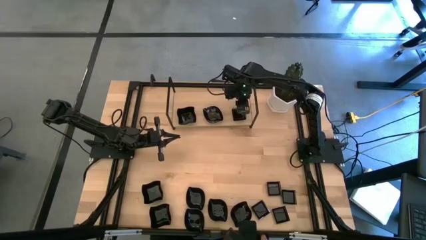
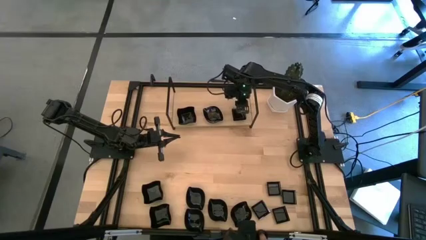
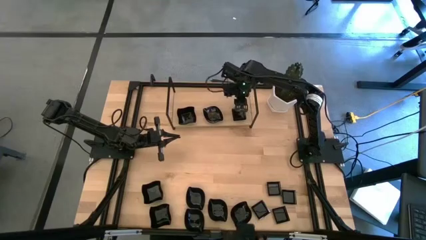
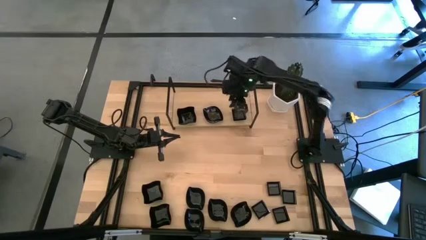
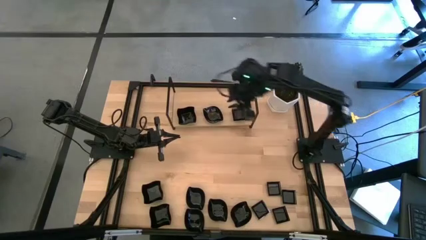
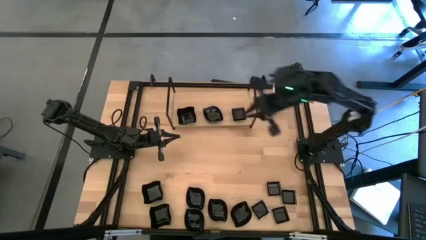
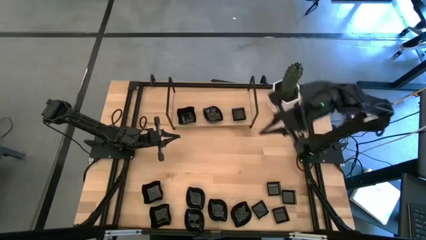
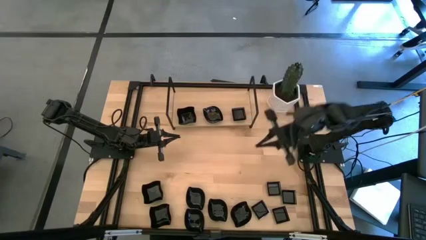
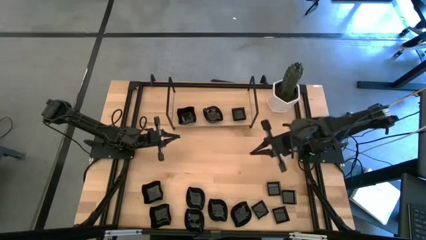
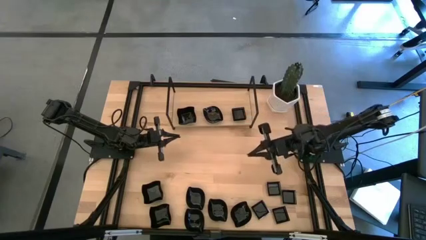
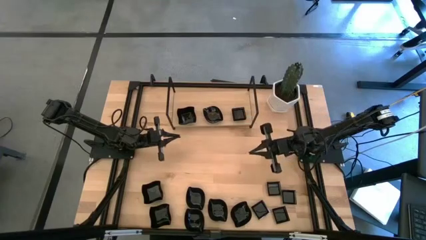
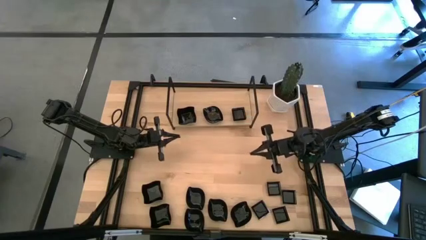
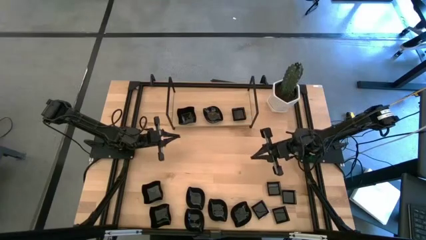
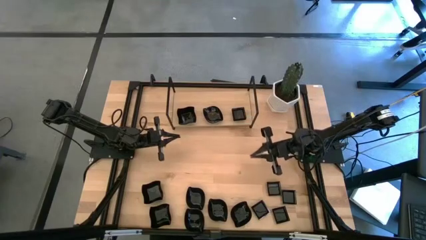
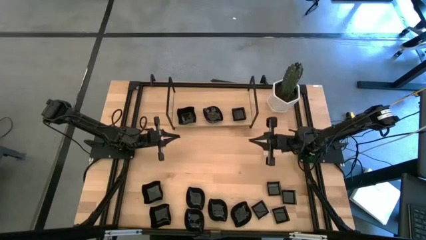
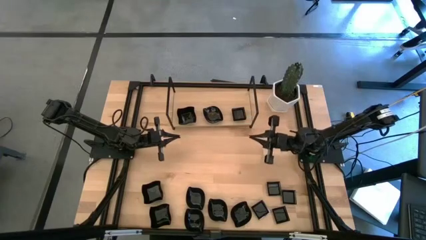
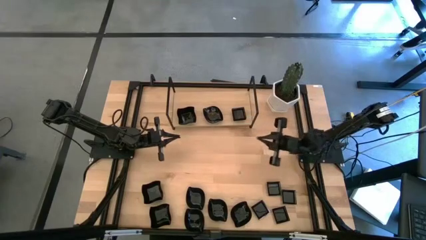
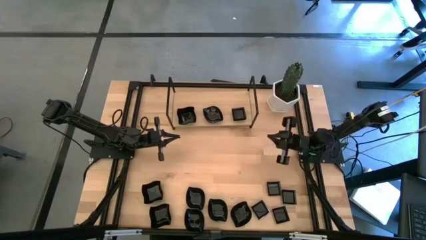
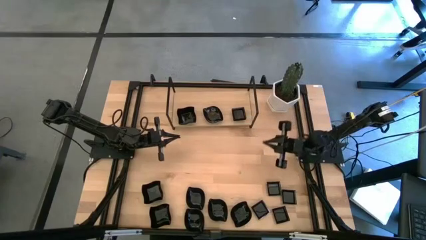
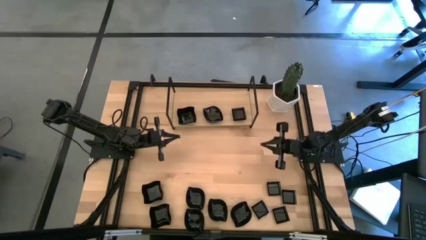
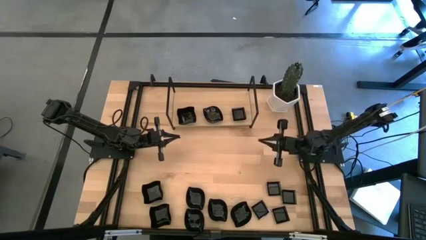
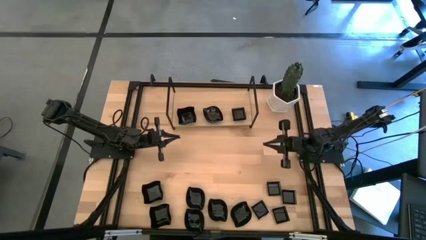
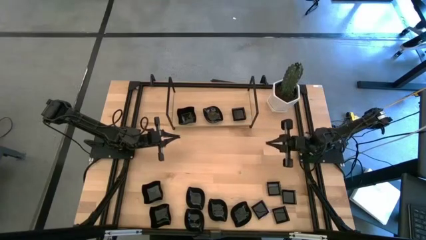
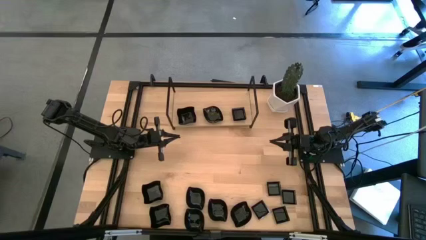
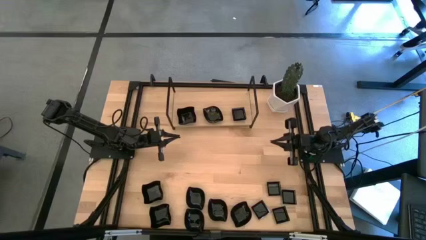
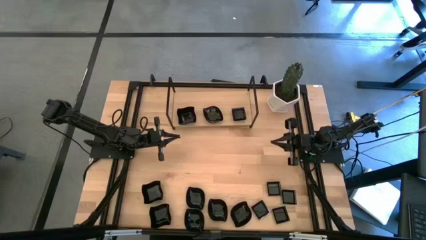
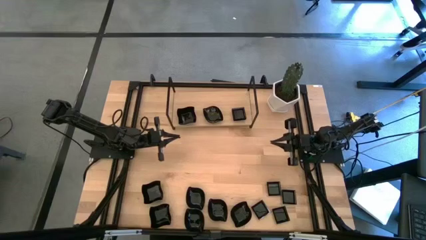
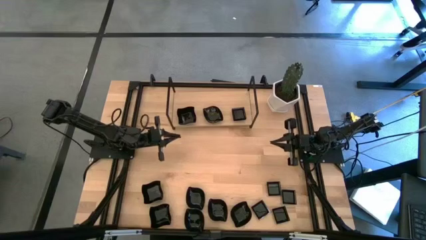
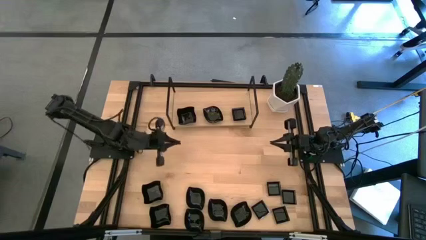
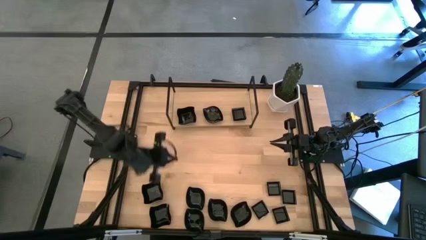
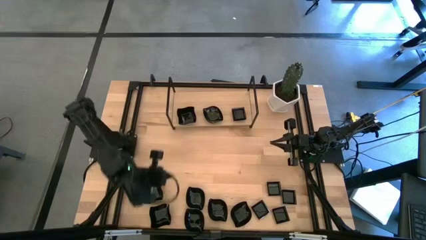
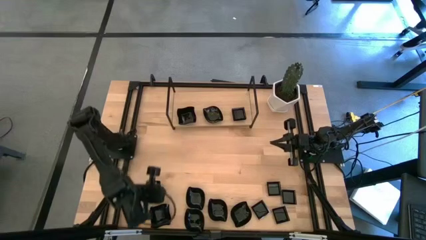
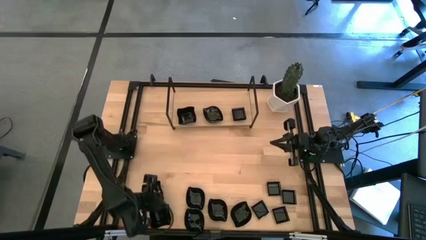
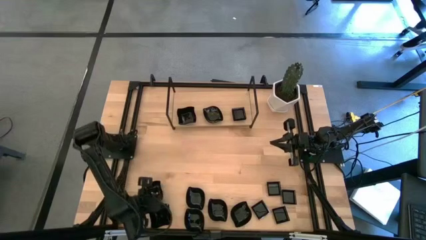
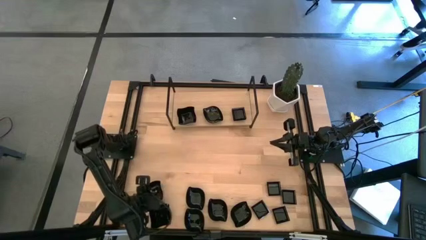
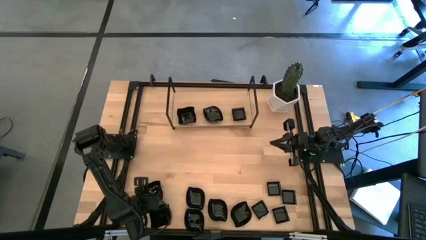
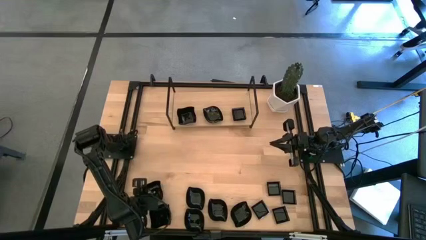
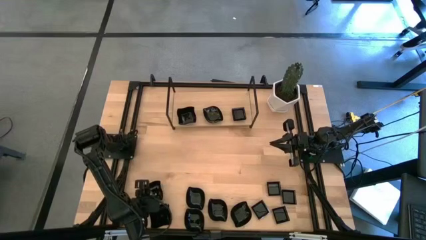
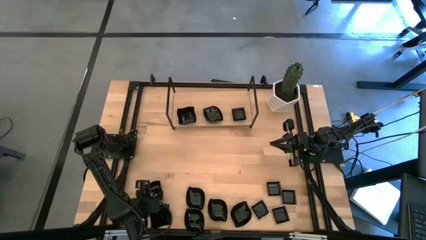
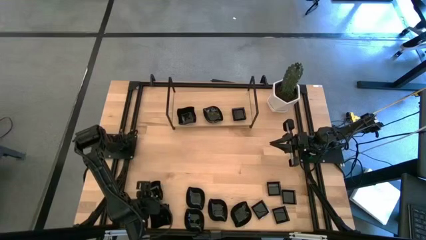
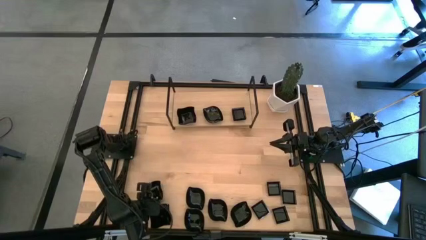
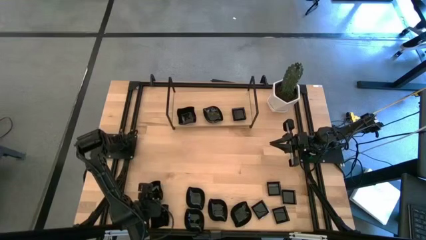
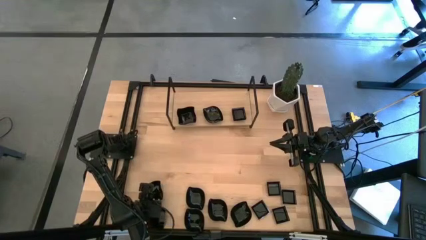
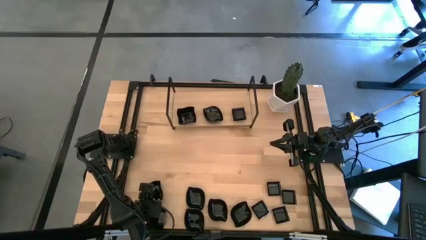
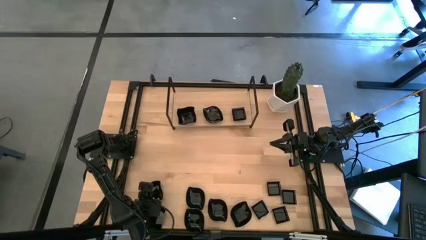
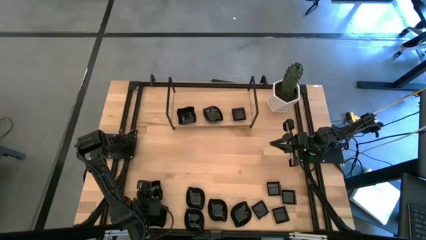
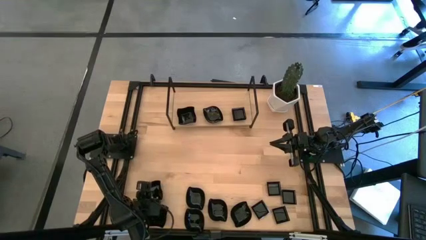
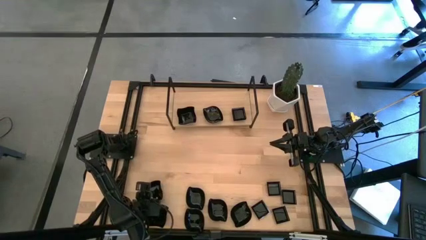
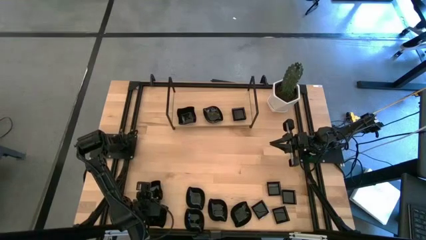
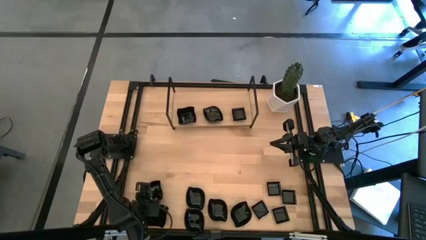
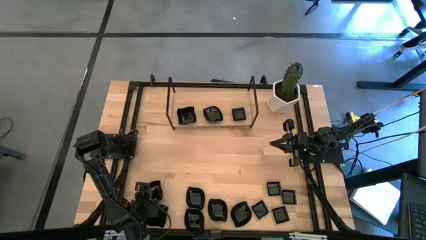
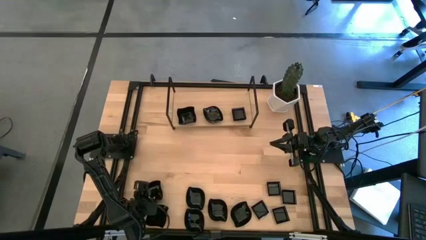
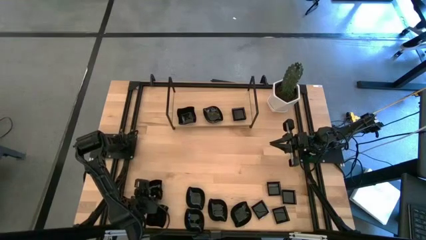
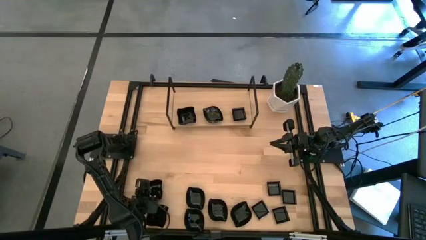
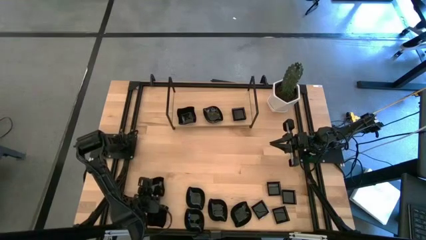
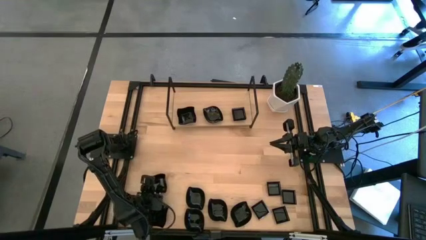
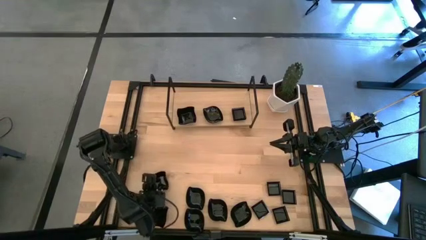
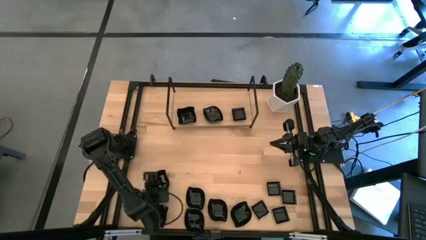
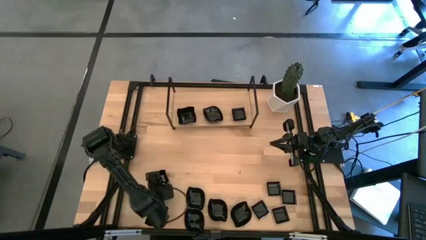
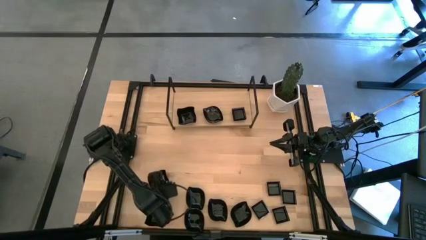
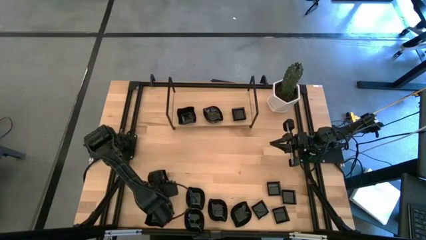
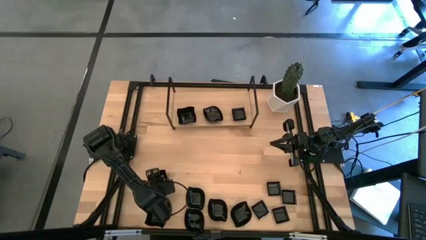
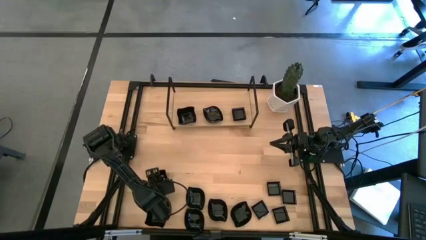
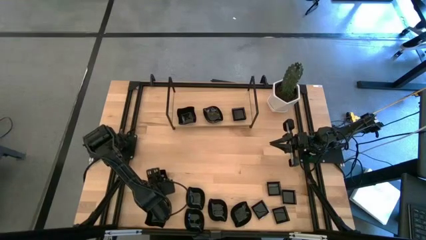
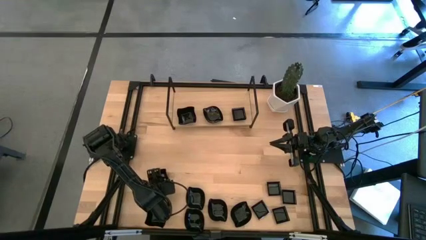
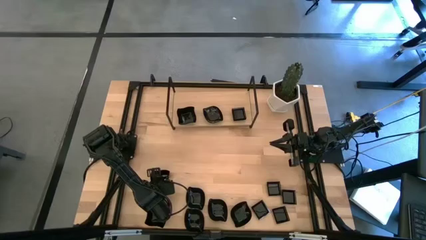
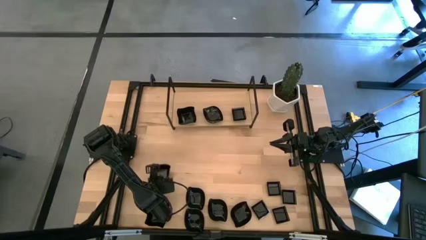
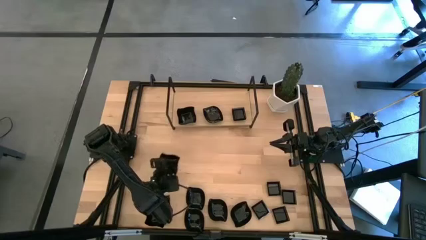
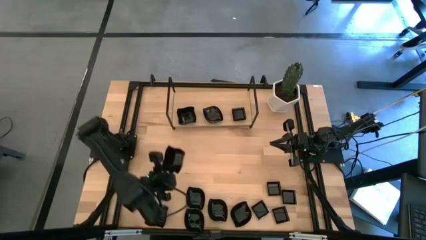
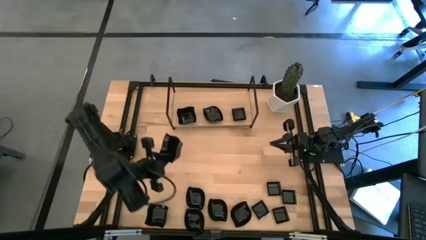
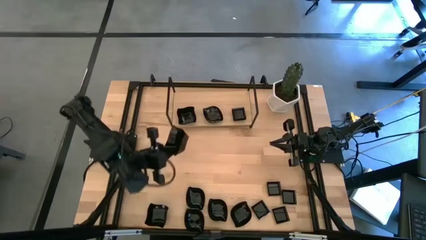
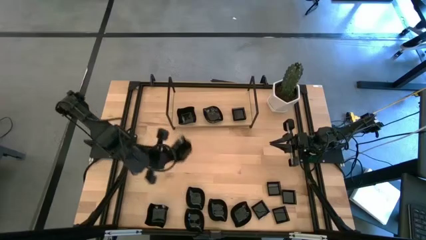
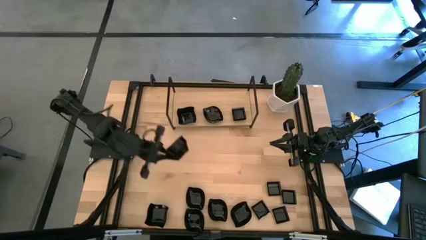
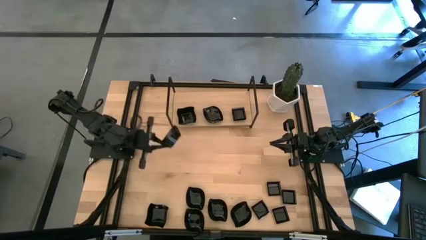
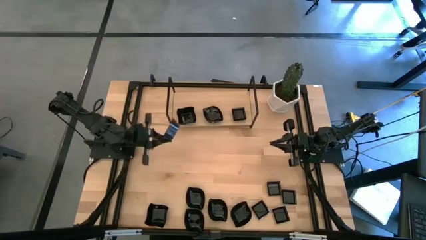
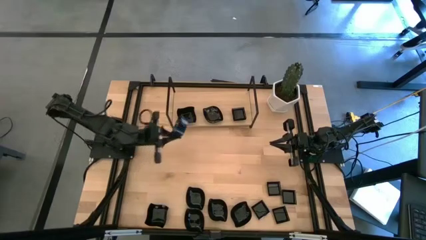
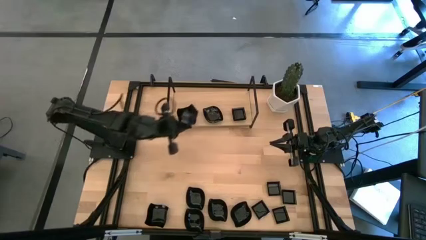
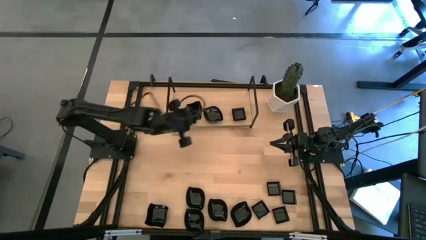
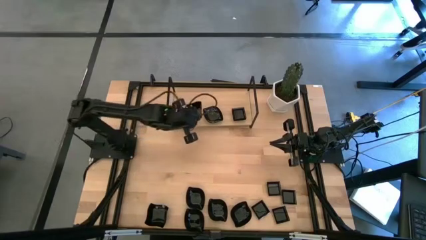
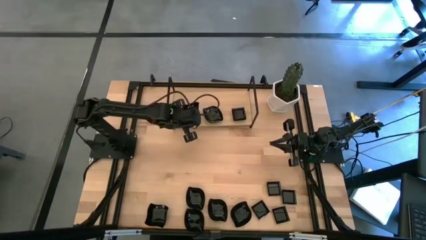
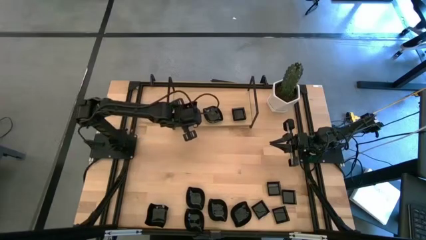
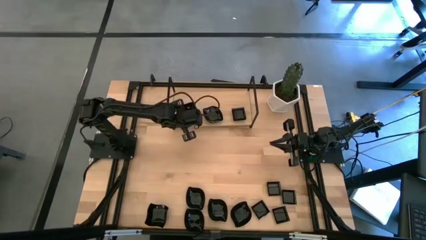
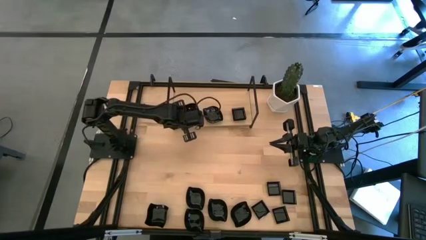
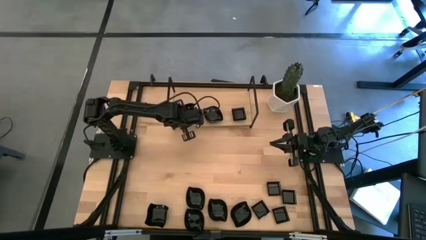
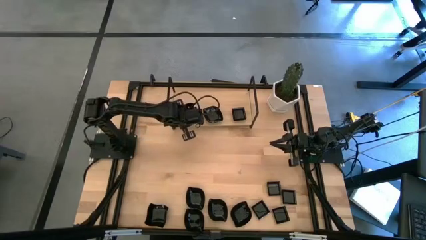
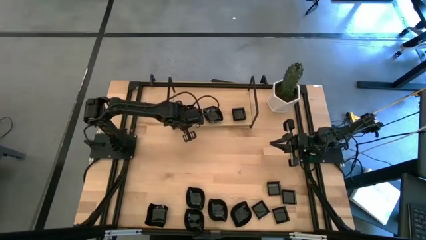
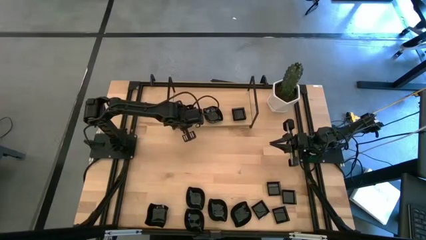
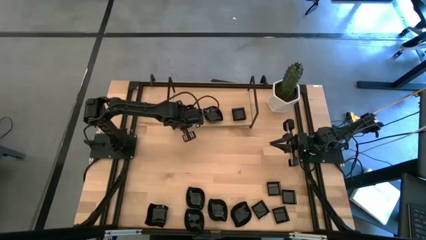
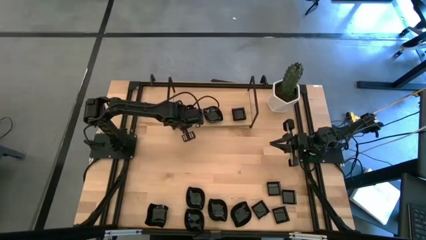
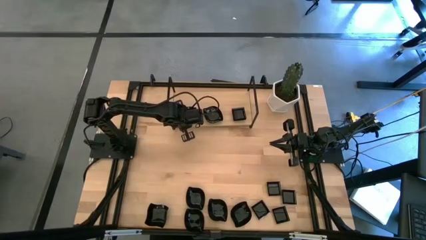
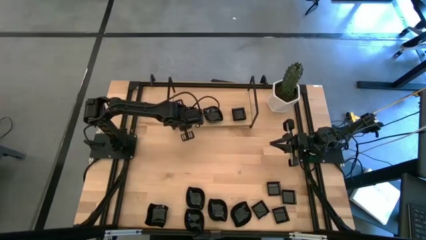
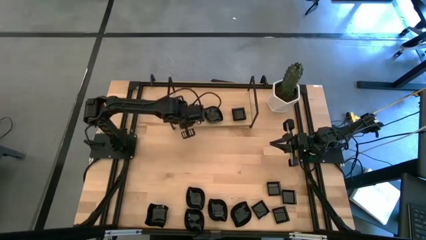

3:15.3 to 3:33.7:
Task: Pick & Place Mini shaped plates
Stack the black distorted square plate on top of the black distorted square plate on the shelf
